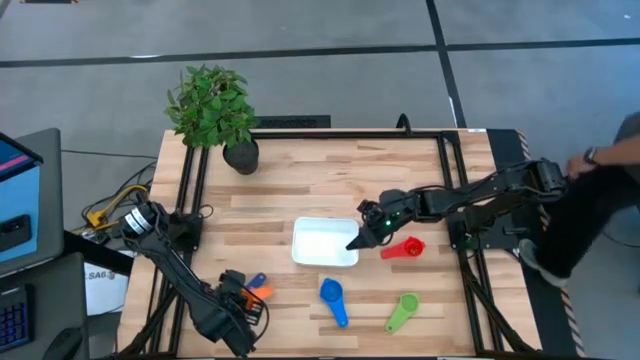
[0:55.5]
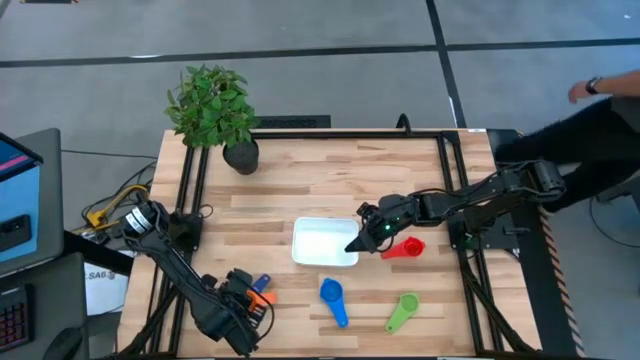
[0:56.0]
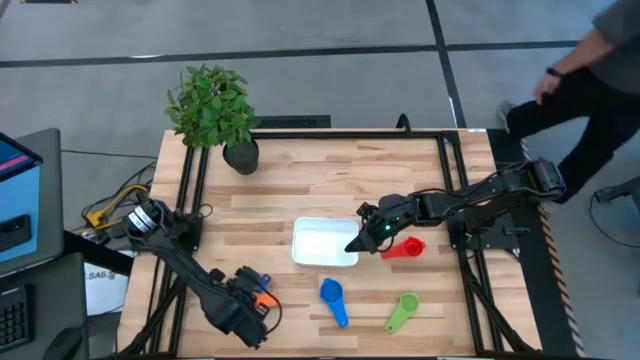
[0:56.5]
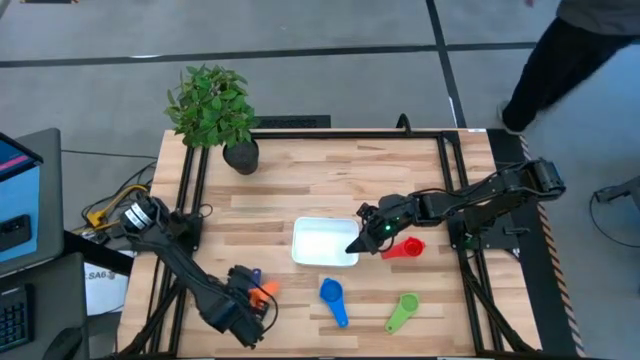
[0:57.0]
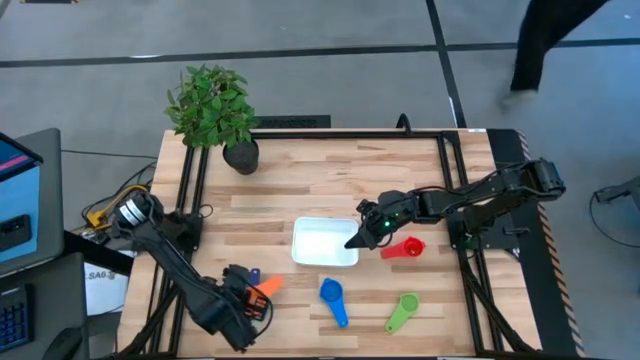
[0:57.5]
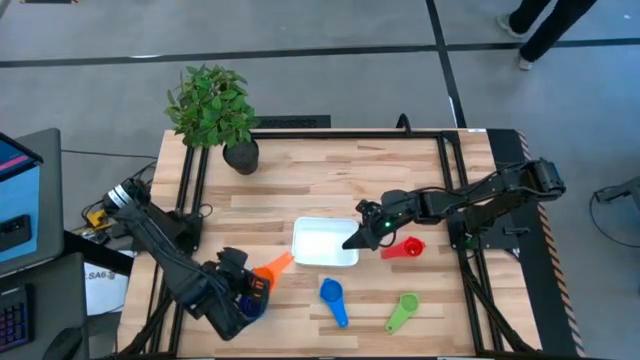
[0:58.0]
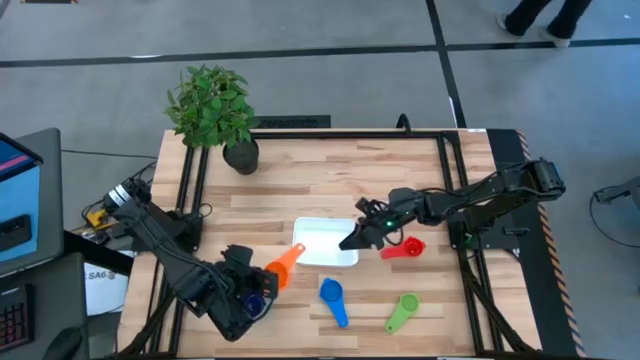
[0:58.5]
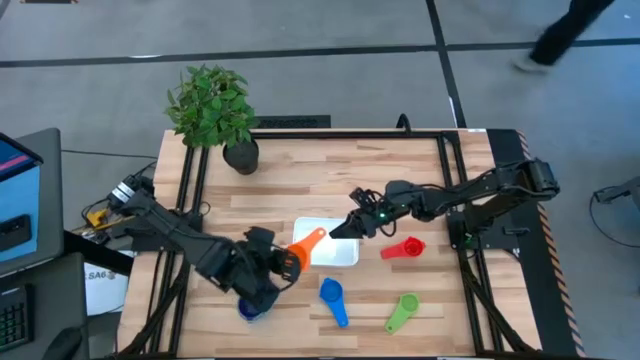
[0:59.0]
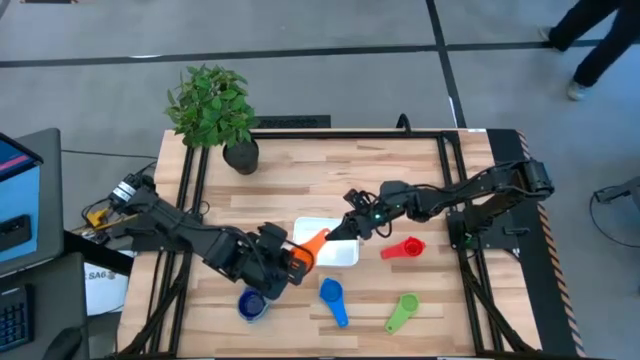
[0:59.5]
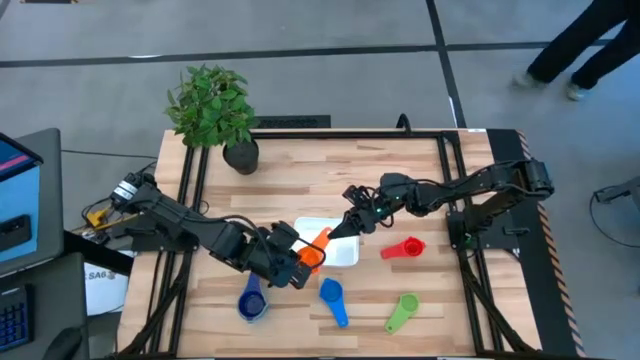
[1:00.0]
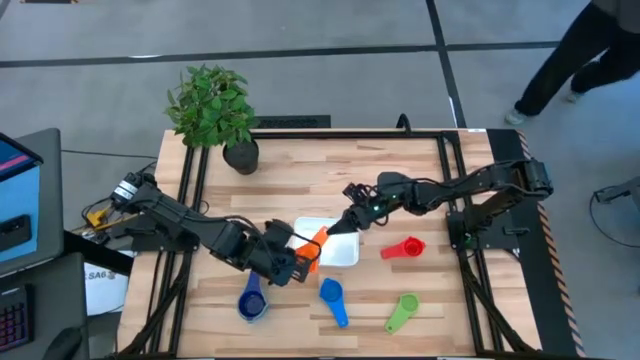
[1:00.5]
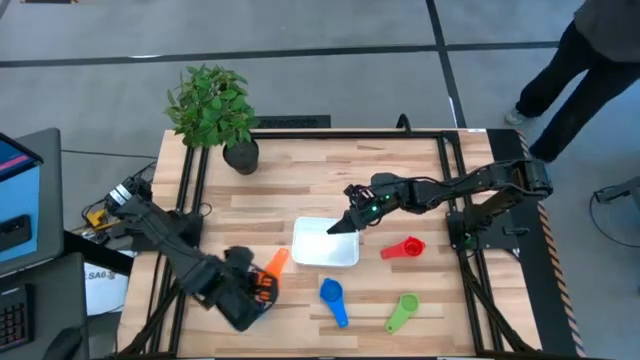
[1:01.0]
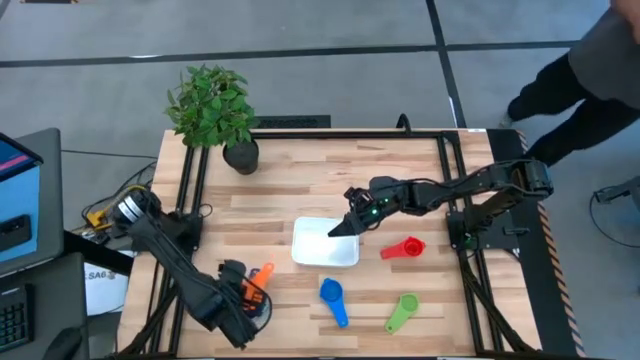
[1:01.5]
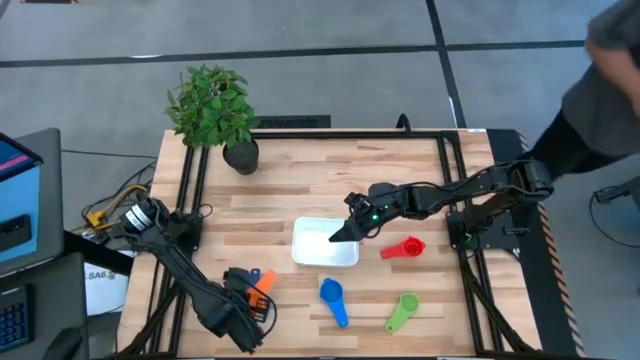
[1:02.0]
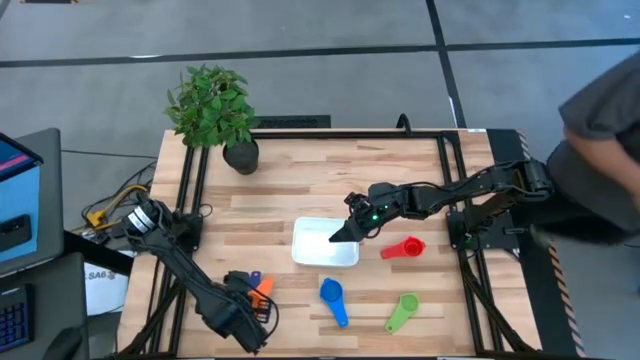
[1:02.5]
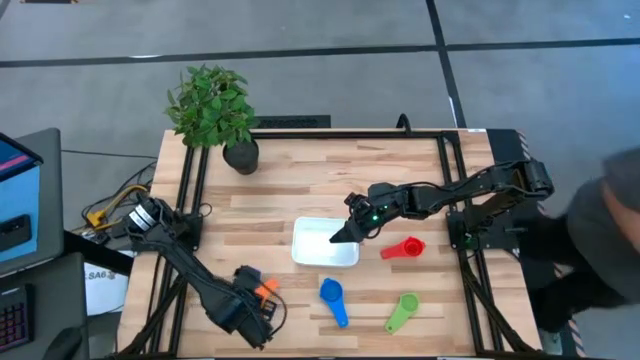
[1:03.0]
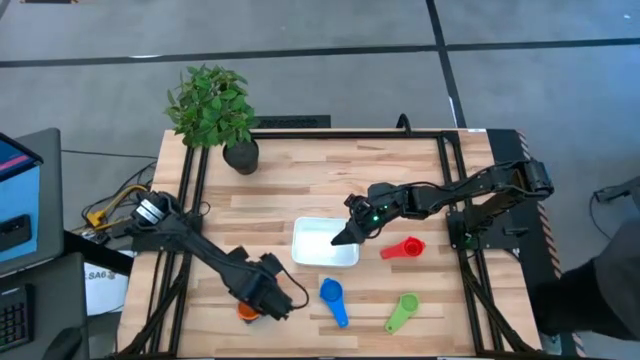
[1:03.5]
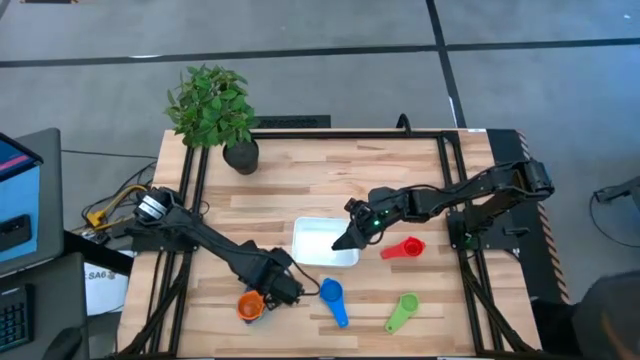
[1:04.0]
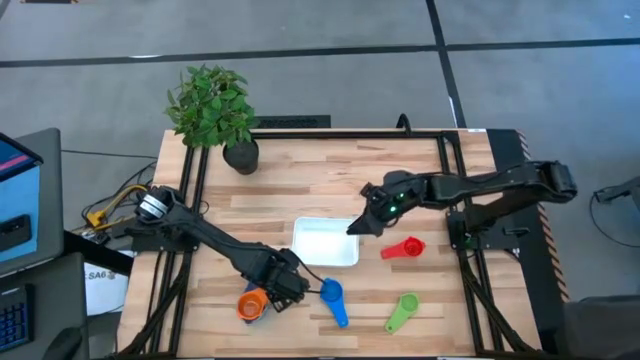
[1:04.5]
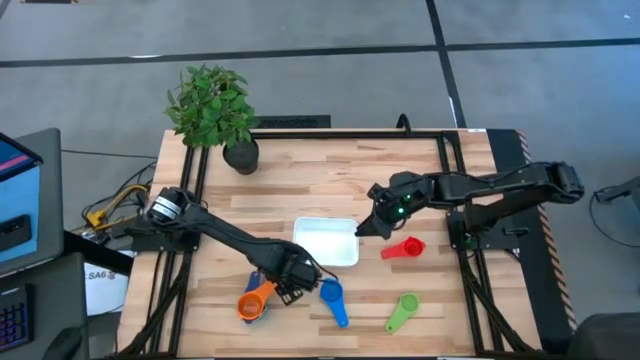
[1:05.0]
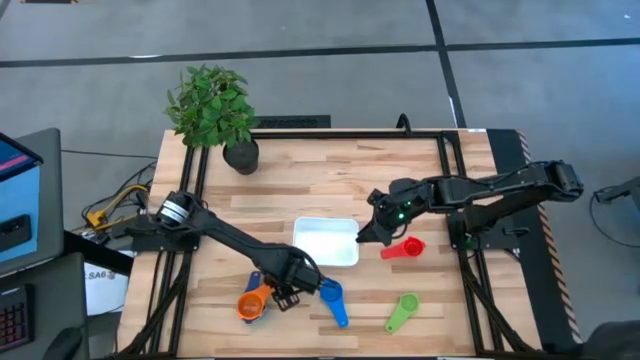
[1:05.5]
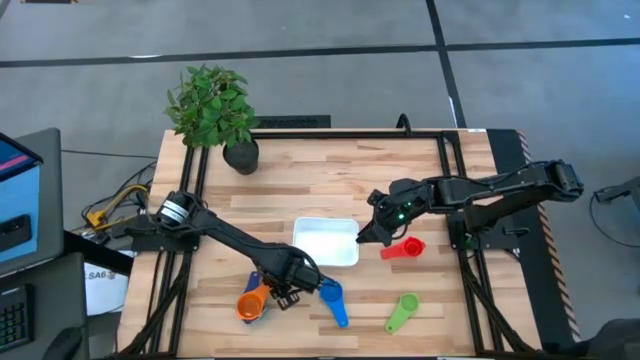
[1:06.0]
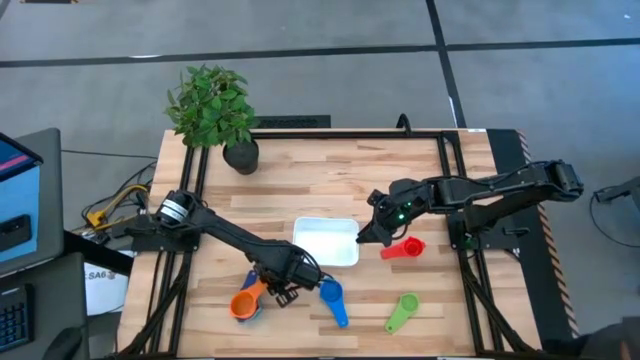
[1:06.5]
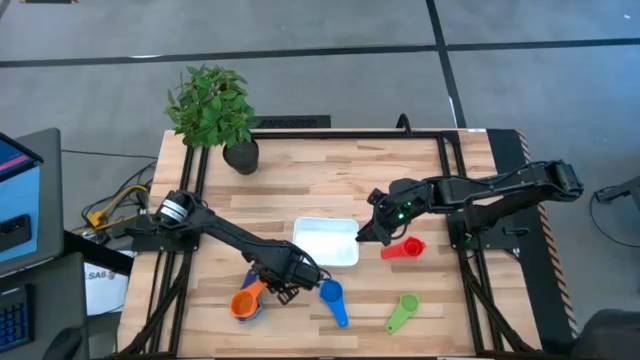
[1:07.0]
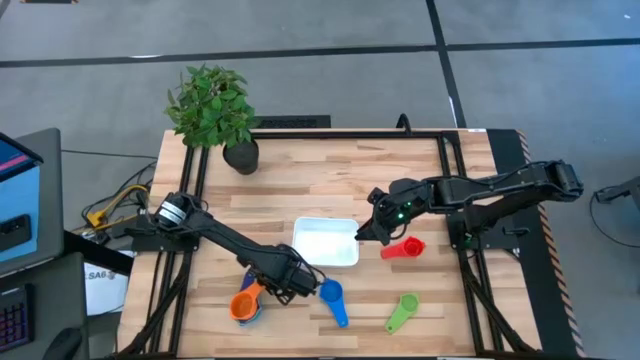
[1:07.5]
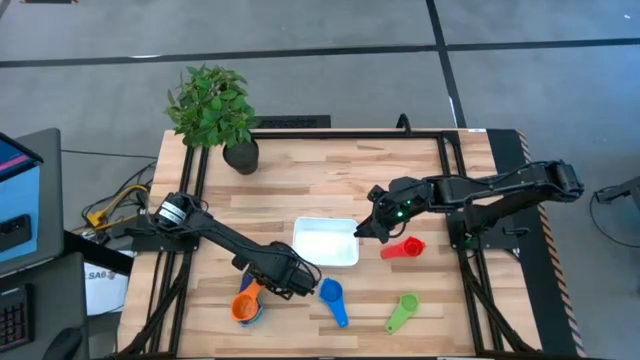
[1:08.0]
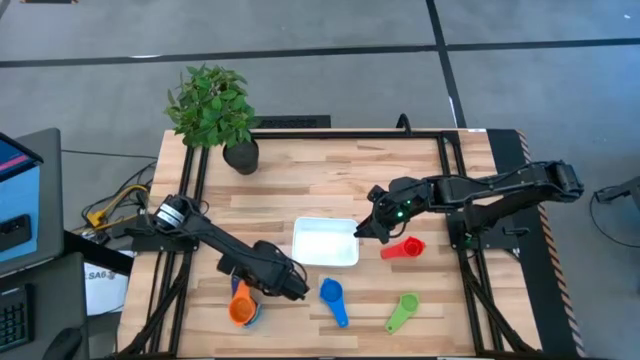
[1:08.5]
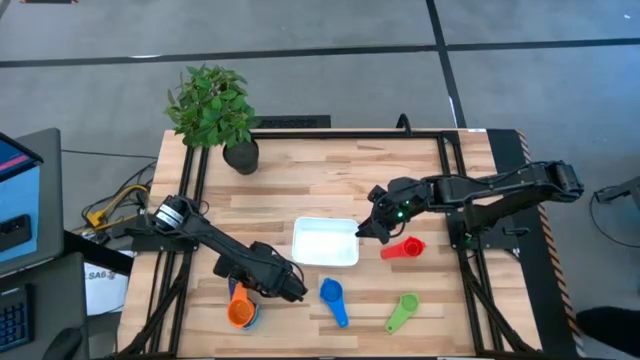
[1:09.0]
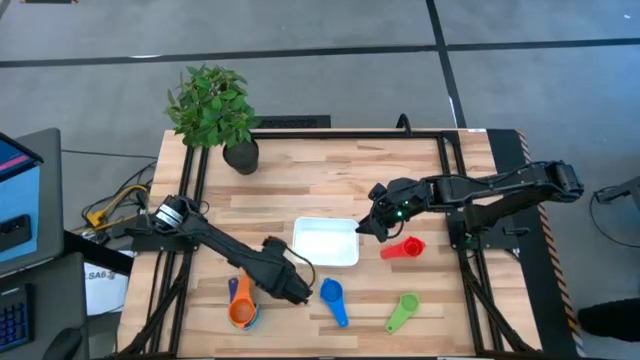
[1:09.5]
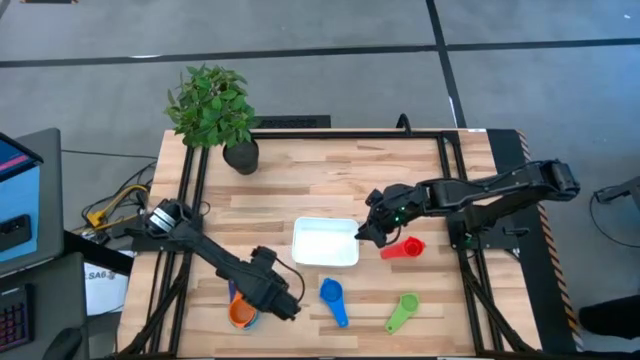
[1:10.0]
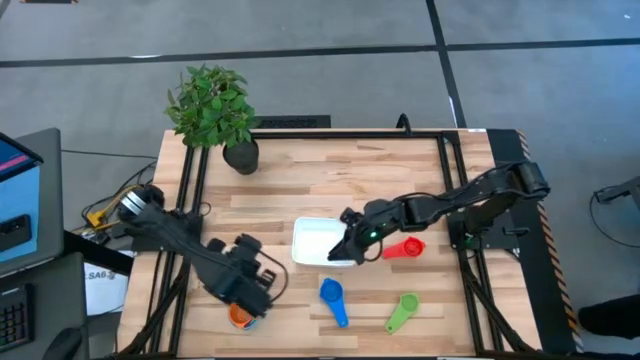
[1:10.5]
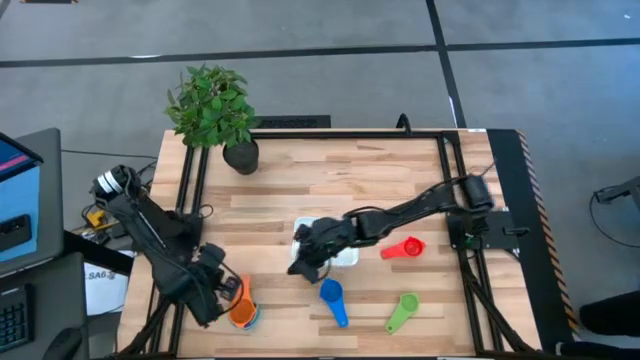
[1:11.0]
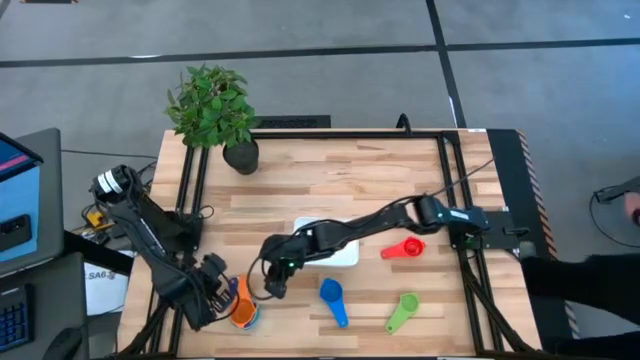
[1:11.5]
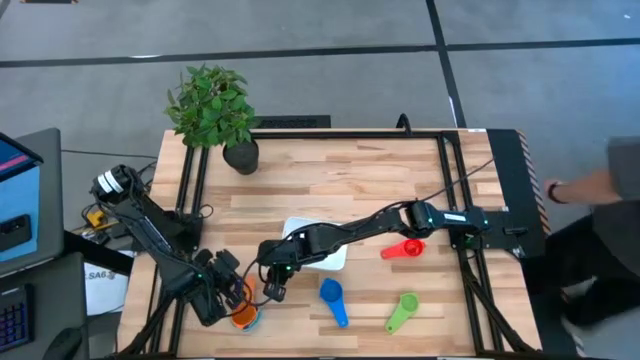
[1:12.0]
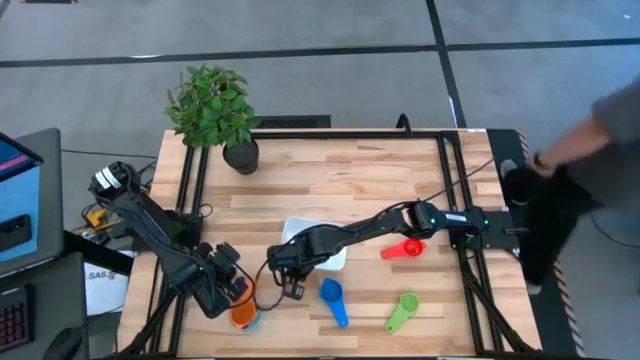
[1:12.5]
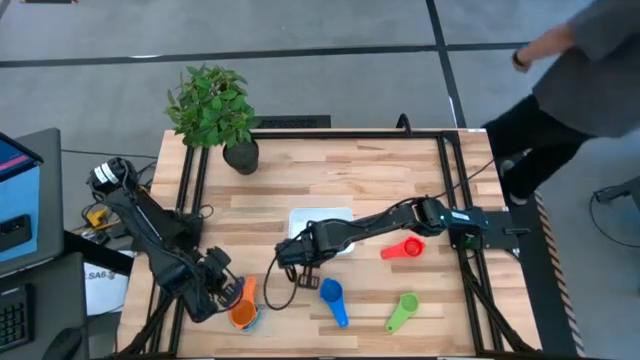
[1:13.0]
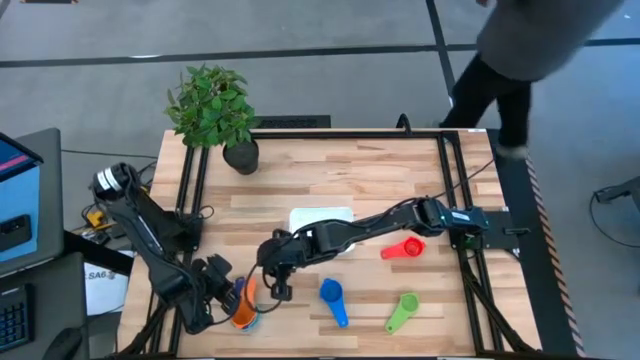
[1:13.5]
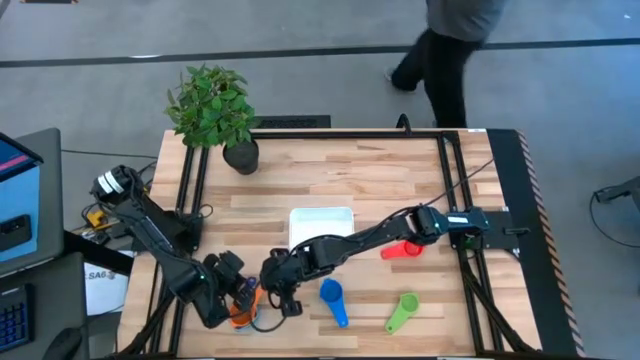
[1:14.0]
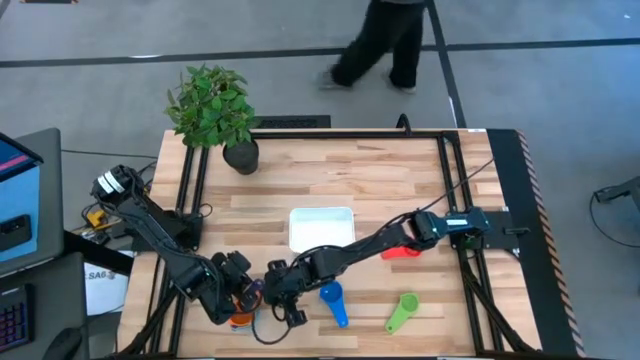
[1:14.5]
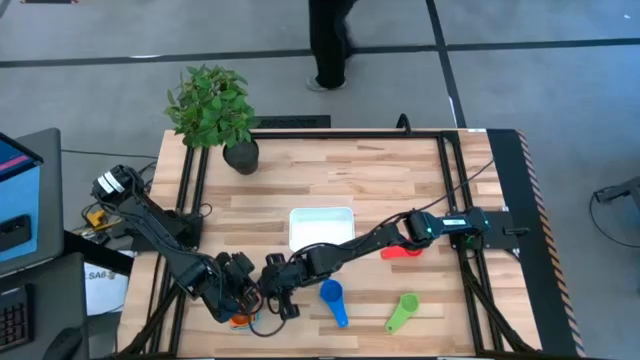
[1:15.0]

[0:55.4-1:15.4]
Task: Nest measuring cups in basket
Stack the orange measuring cup into the purple measuring cup

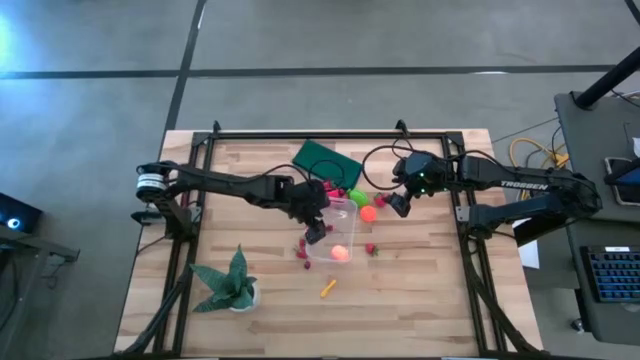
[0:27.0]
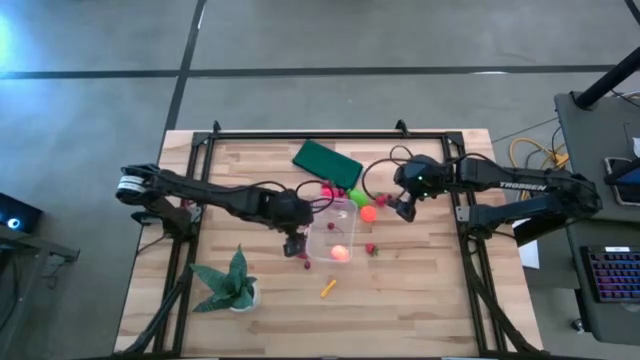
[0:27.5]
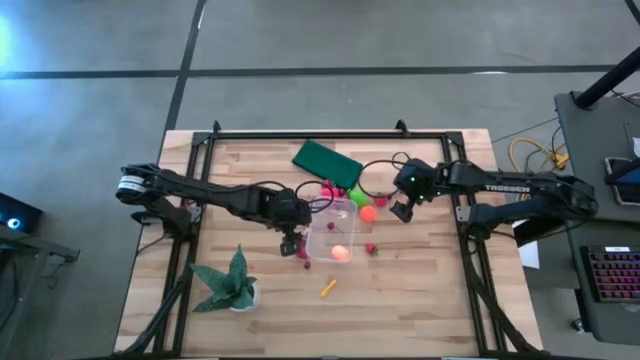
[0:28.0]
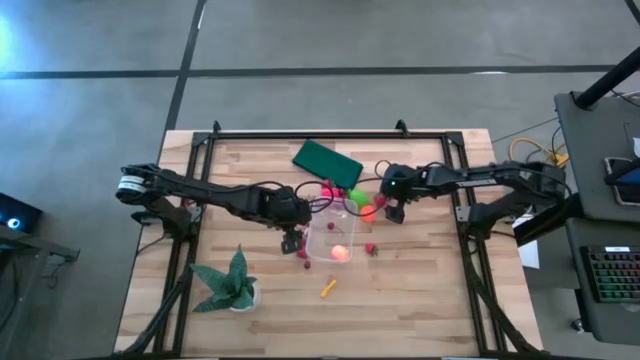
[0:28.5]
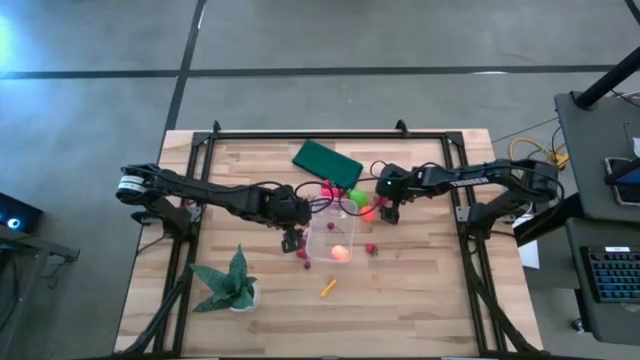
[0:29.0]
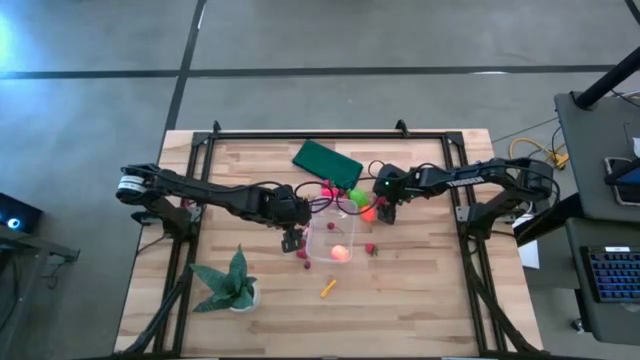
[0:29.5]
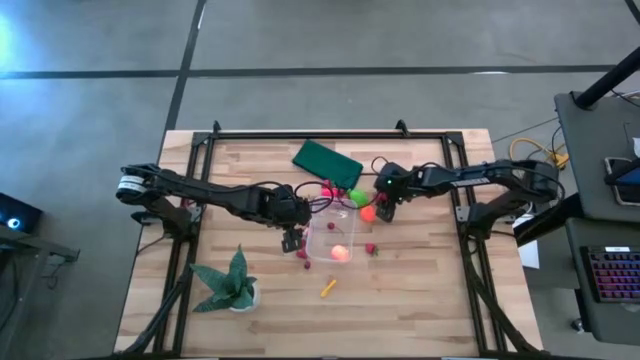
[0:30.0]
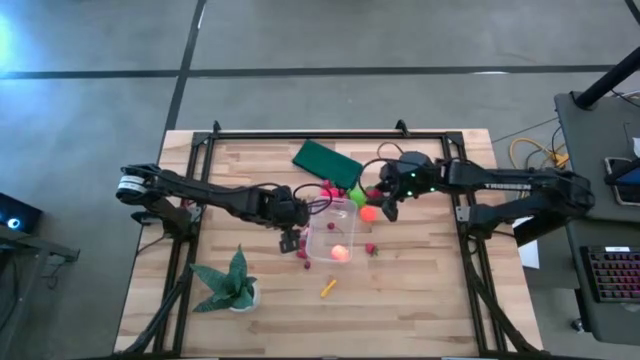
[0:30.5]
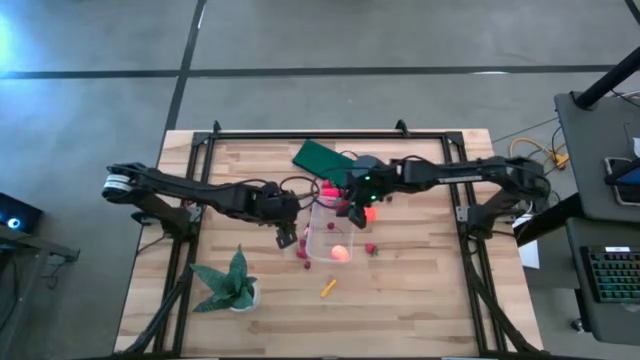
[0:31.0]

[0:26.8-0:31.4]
Task: Pick and placing Produce into tupperware
Put the red strawberry into the transparent bin
